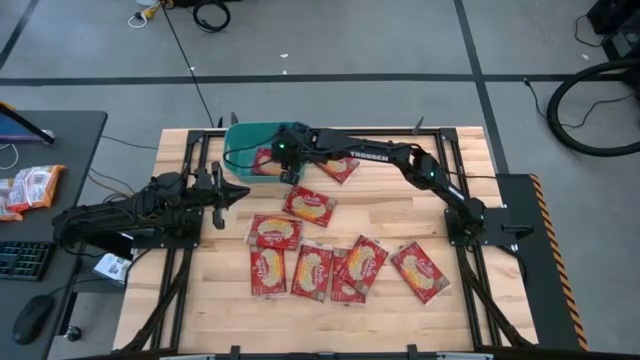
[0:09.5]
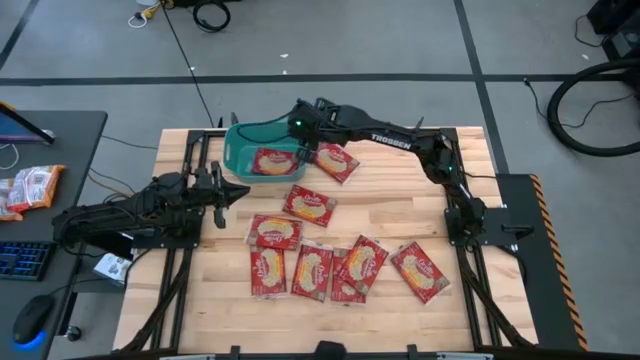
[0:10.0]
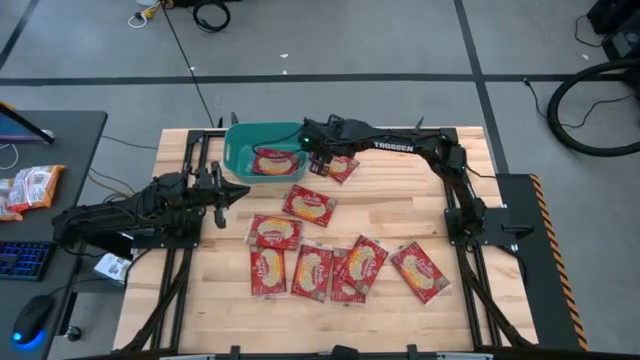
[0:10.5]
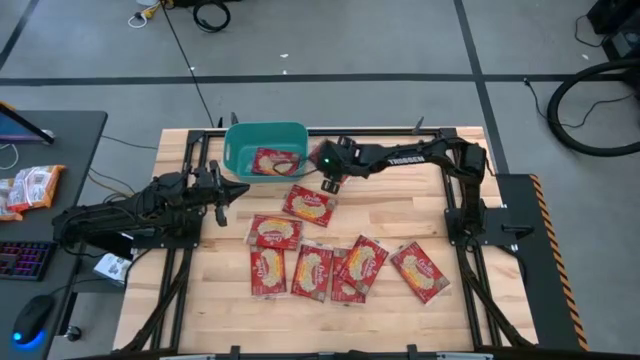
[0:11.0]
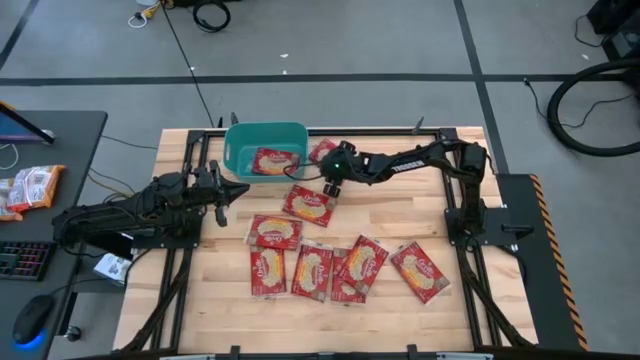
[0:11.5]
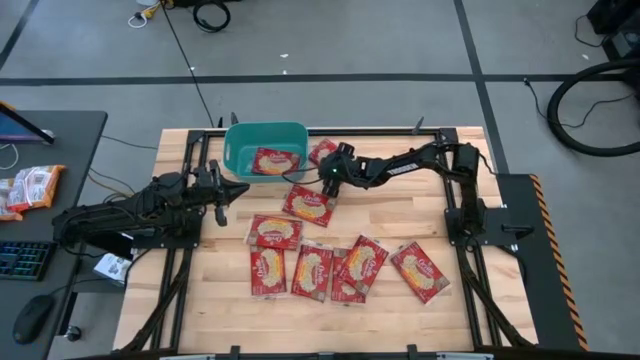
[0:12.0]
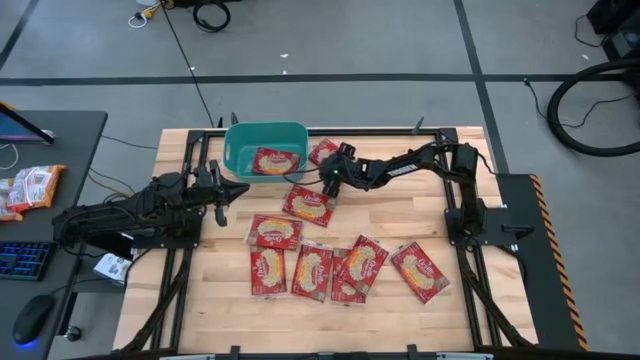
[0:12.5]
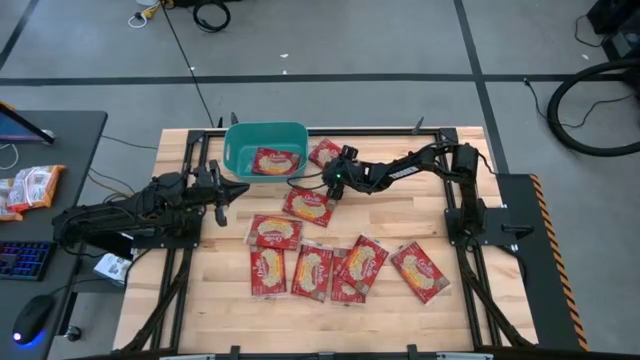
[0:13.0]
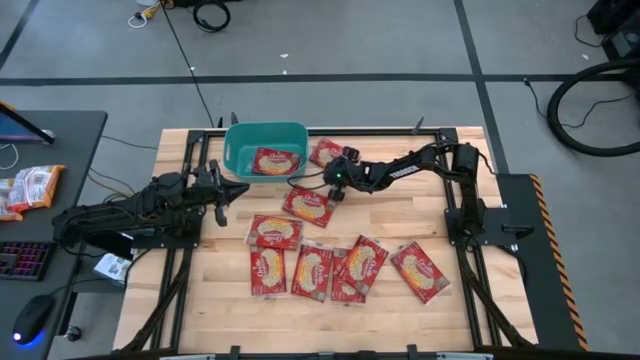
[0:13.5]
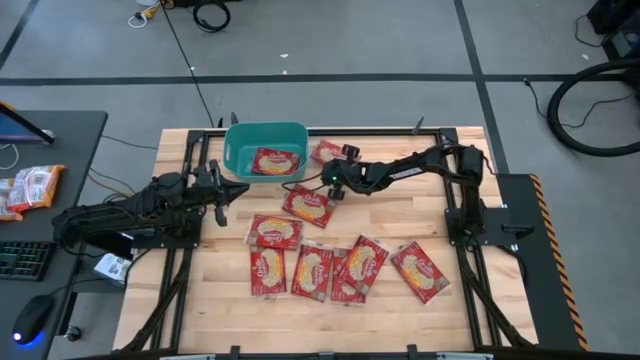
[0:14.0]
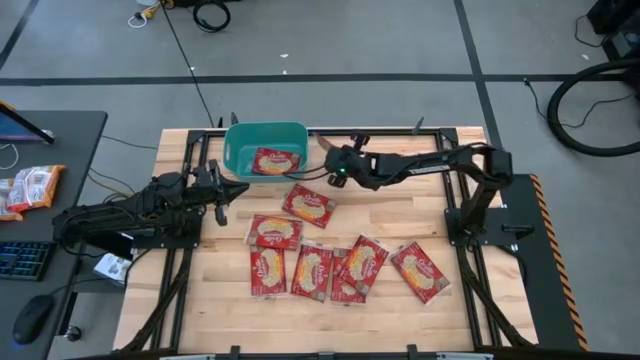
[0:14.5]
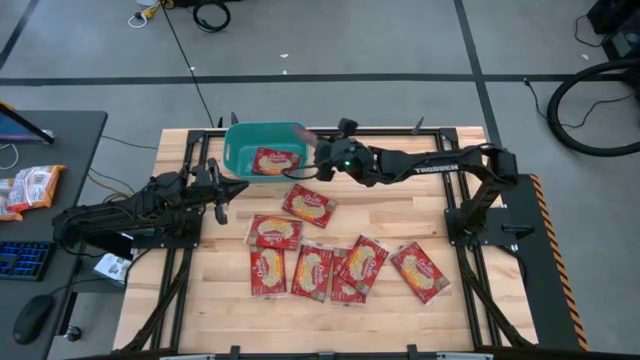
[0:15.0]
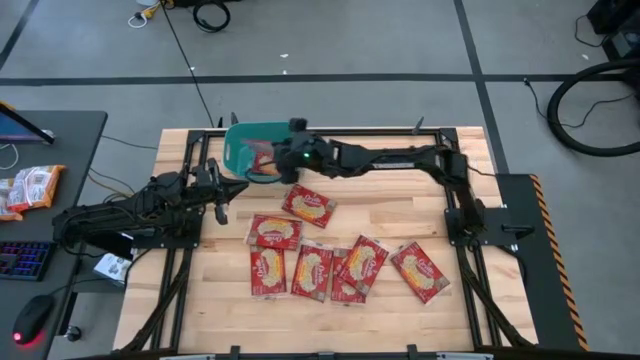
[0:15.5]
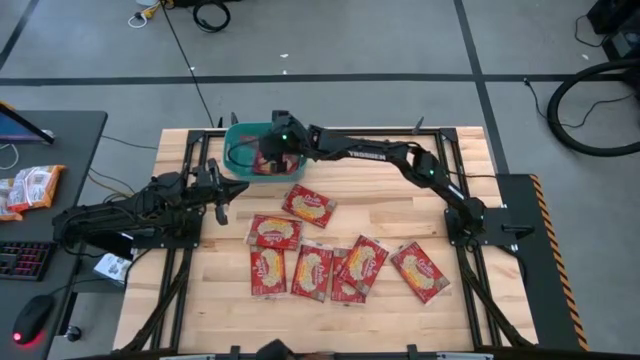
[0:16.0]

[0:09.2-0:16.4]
Task: Sort popcorn bags into baskets
Put the red popcorn bag into the green bin

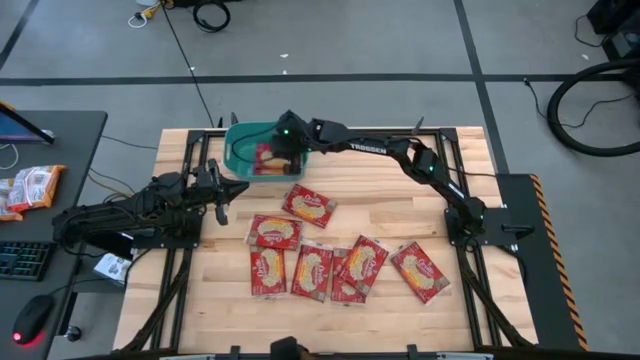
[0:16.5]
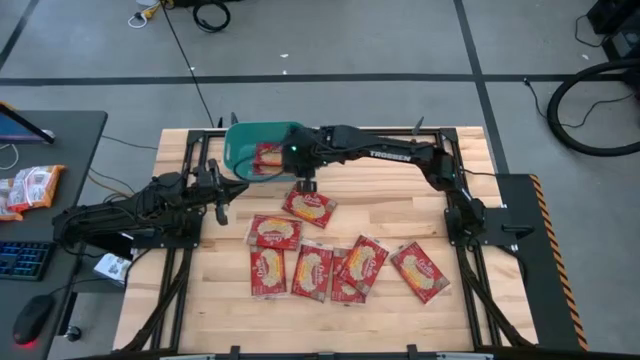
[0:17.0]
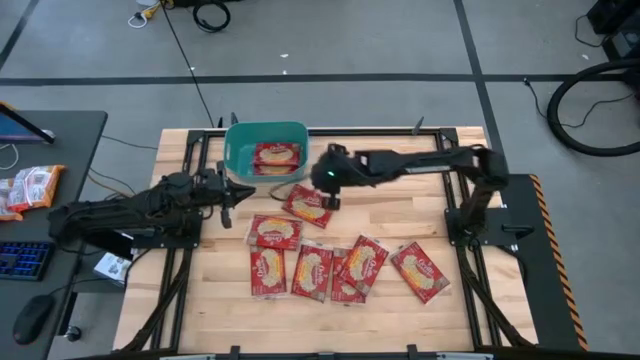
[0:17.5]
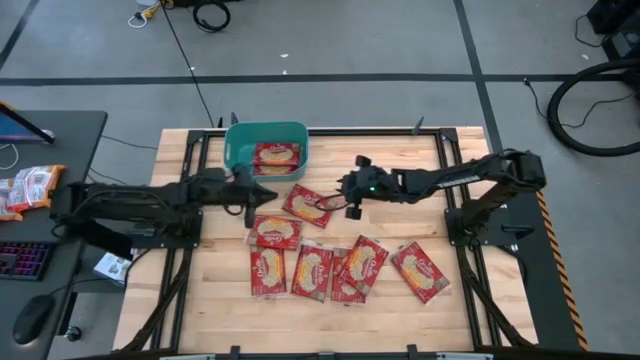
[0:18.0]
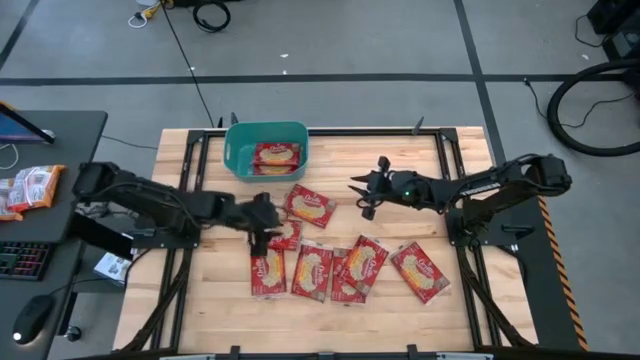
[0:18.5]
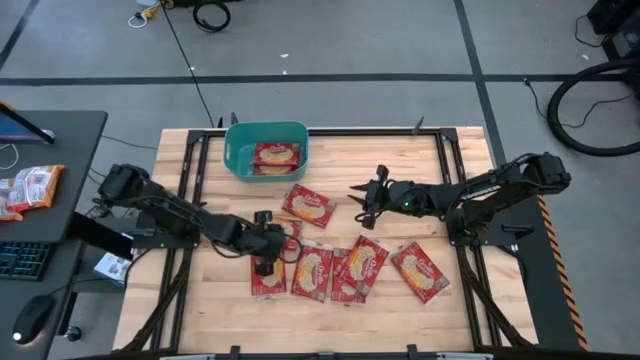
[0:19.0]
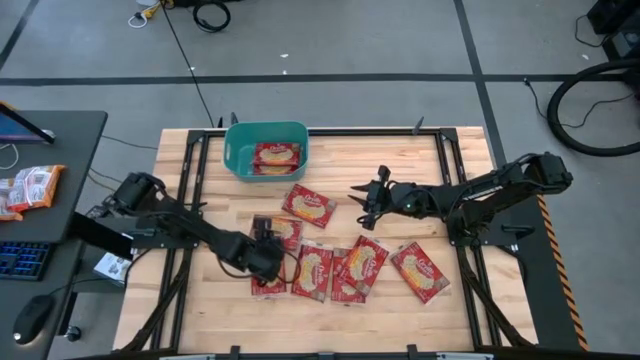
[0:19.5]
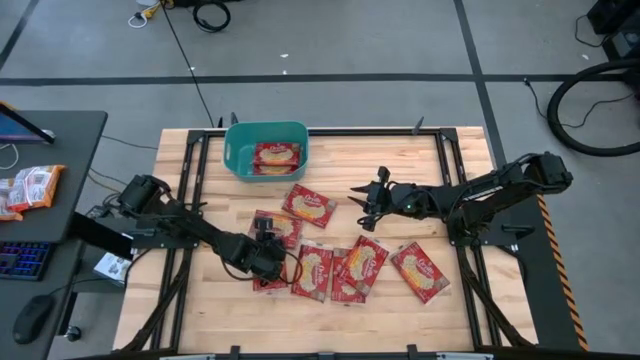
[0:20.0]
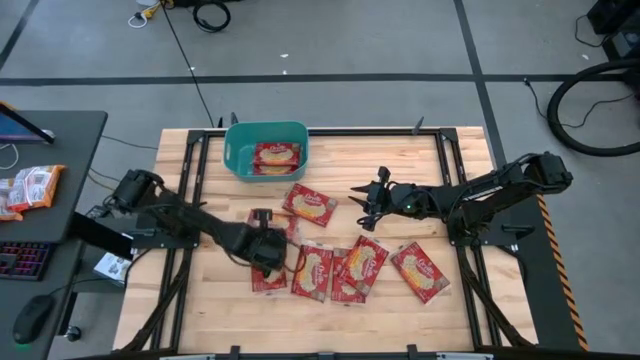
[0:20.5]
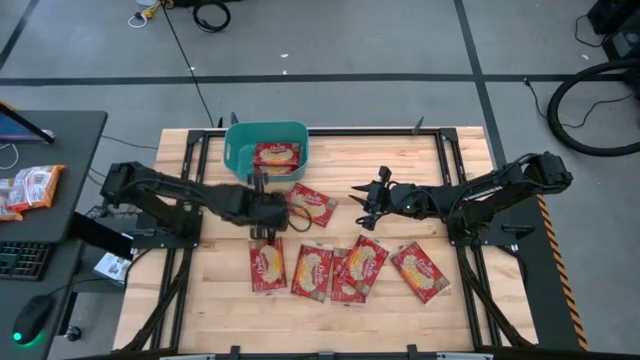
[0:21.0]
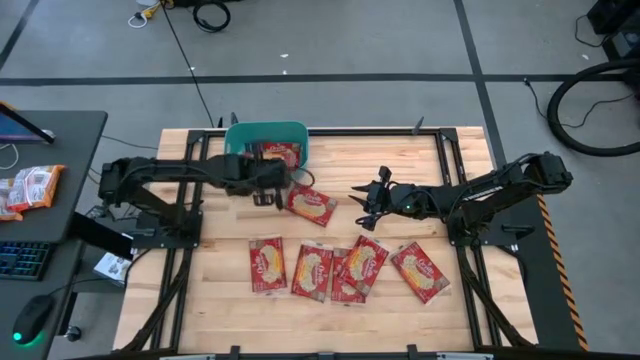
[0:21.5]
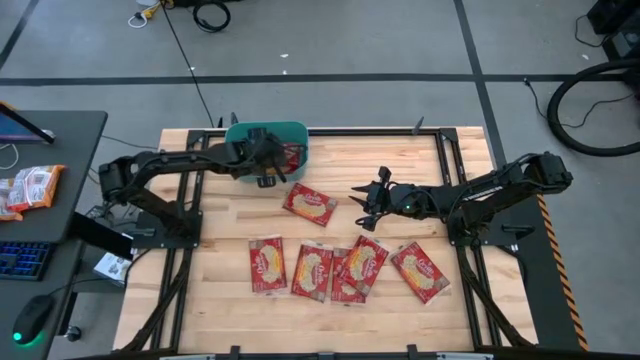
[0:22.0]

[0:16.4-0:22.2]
Put the red popcorn bag into the green bin

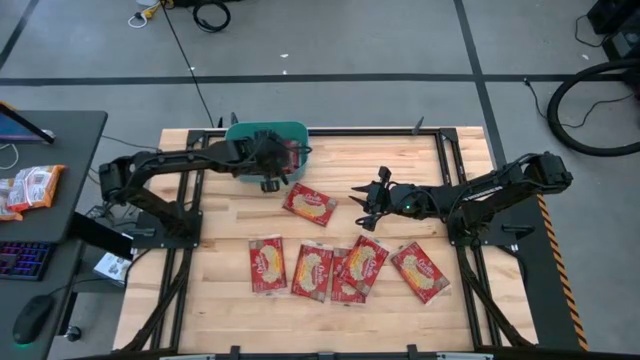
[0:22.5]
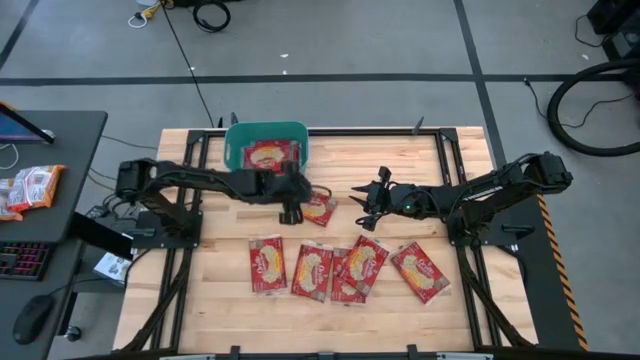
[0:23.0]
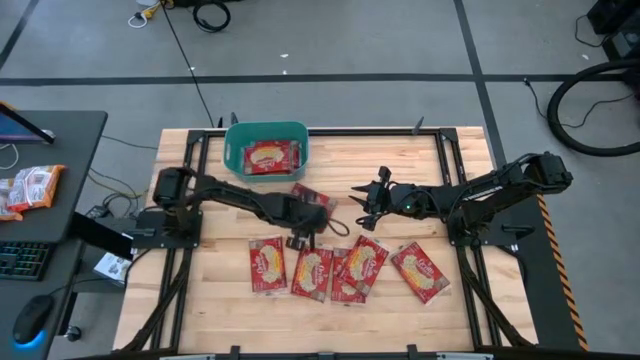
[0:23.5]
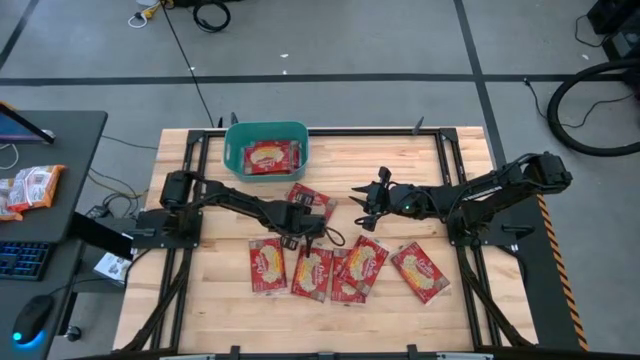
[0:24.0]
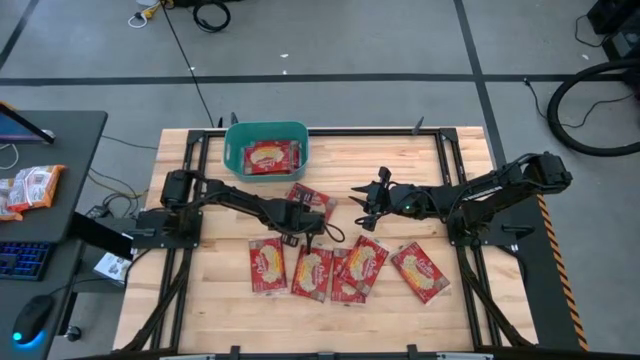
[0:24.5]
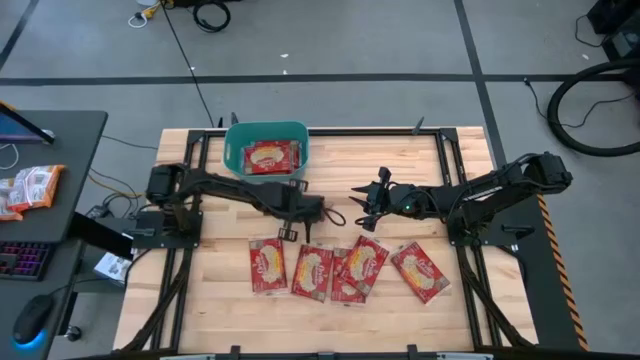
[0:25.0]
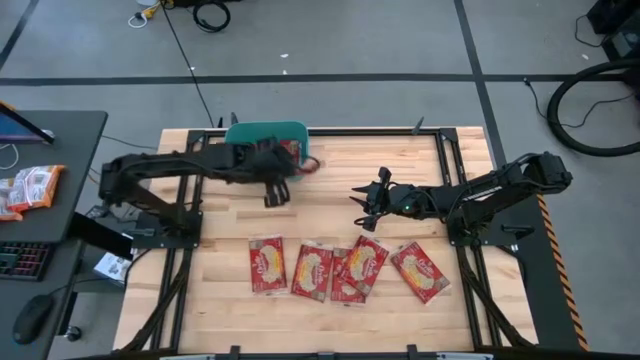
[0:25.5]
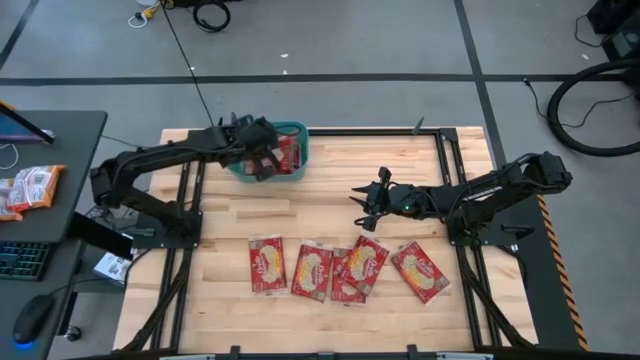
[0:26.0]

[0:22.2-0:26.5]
Put the red popcorn bag into the green bin

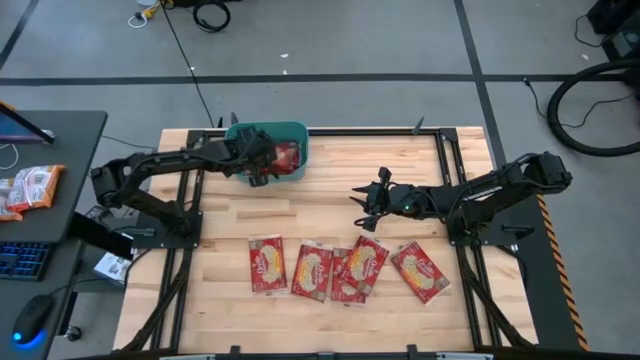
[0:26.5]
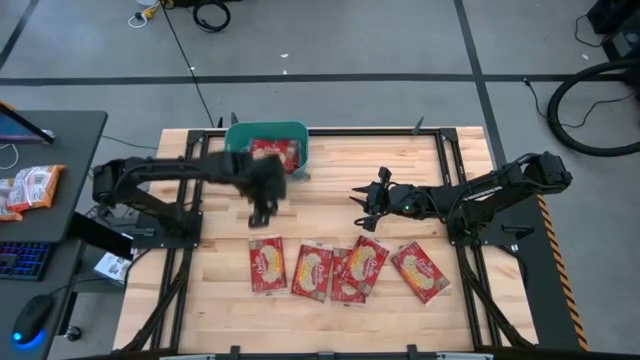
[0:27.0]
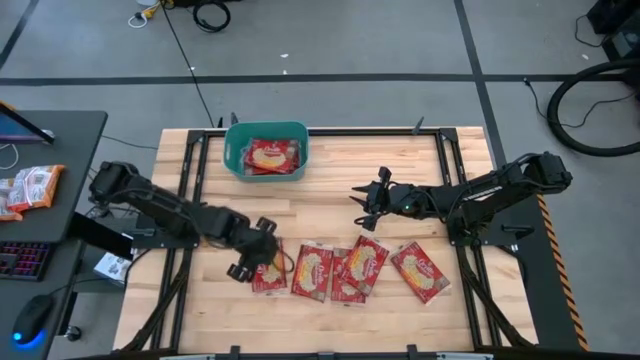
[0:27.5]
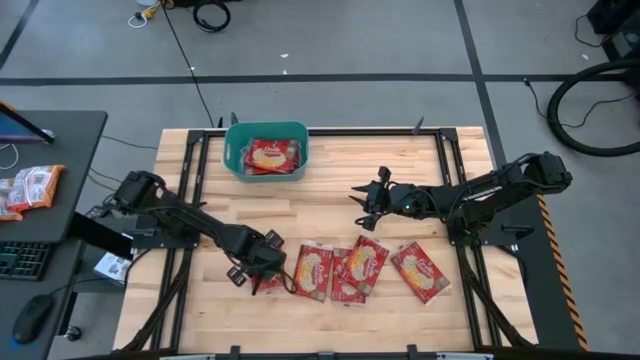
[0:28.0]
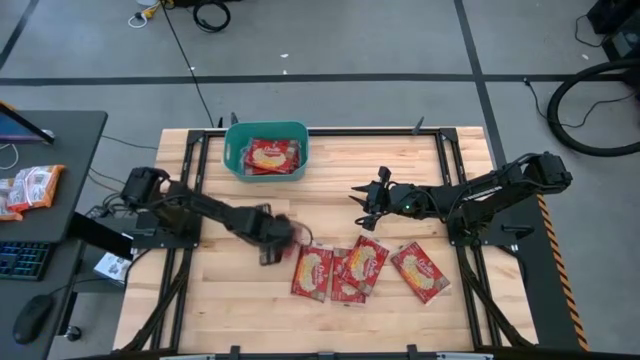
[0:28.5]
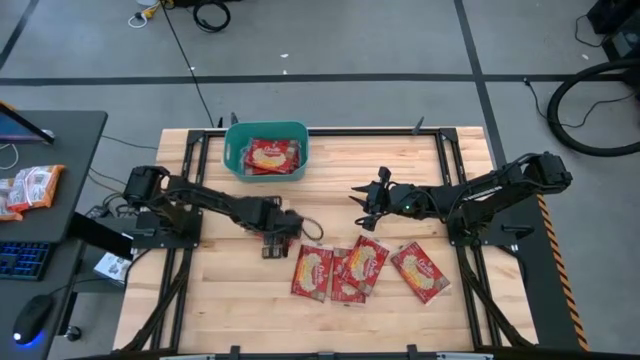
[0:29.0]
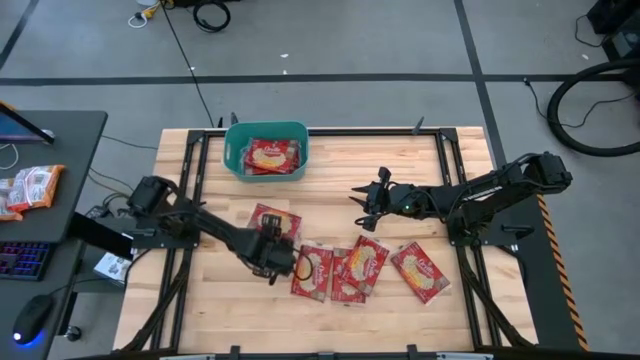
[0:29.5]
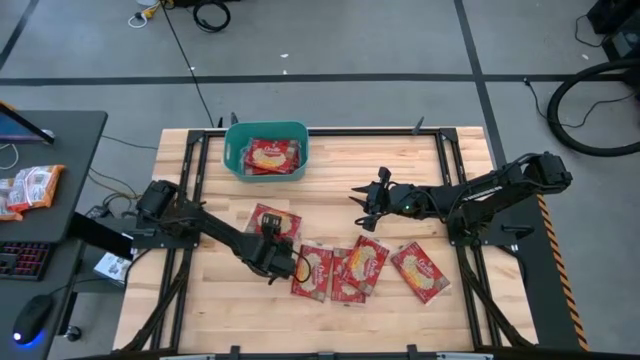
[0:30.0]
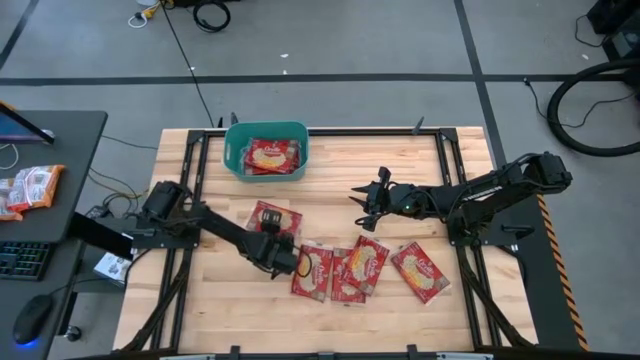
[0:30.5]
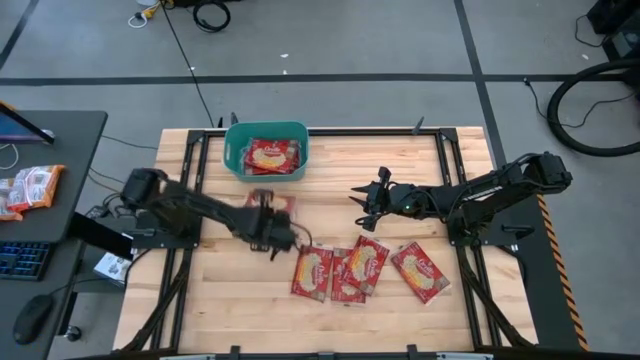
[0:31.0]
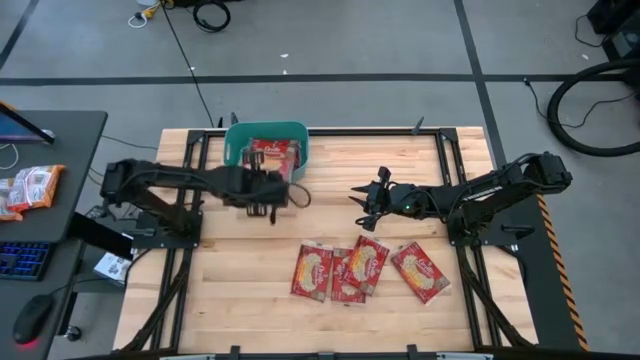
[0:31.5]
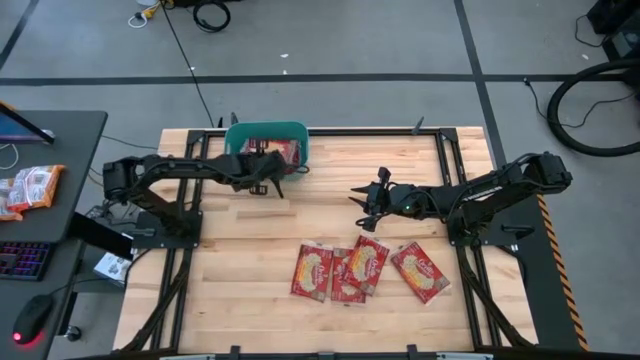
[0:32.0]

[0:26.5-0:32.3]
Put the left red popcorn bag into the green bin
